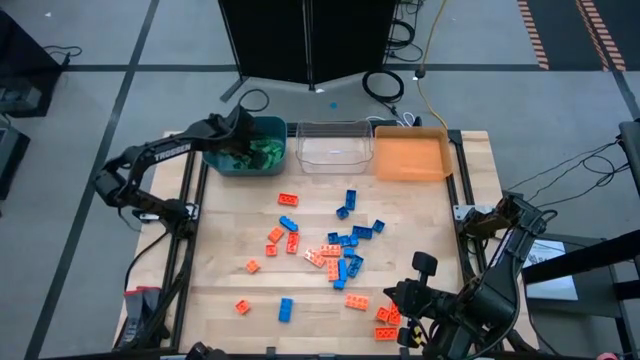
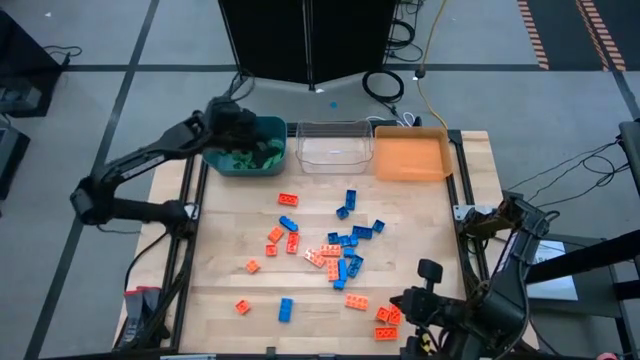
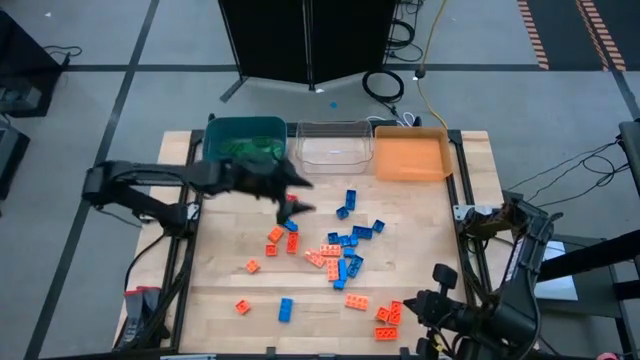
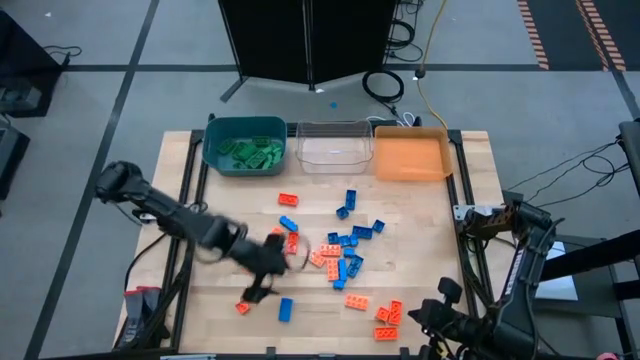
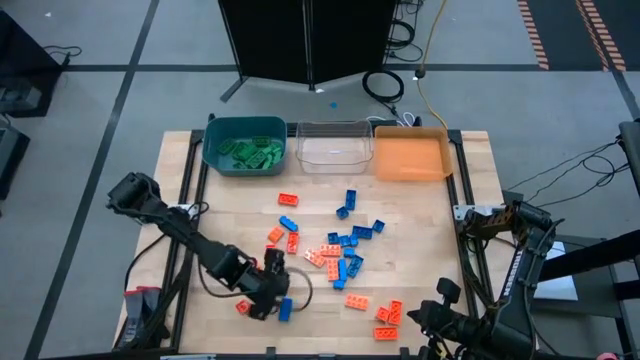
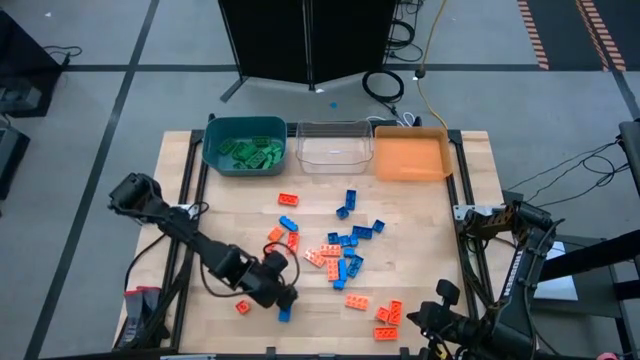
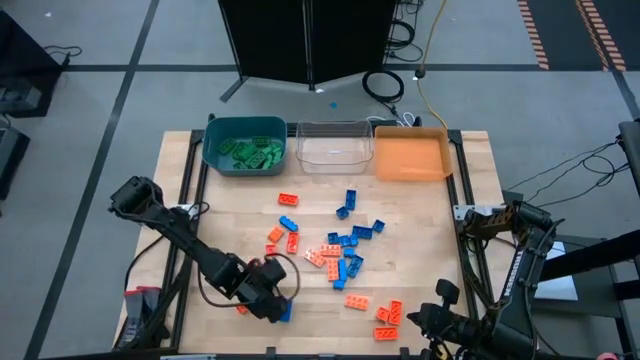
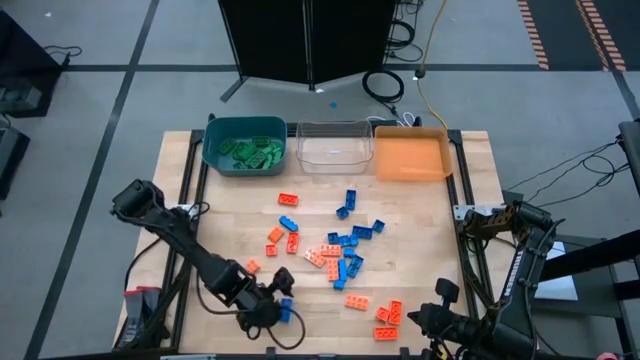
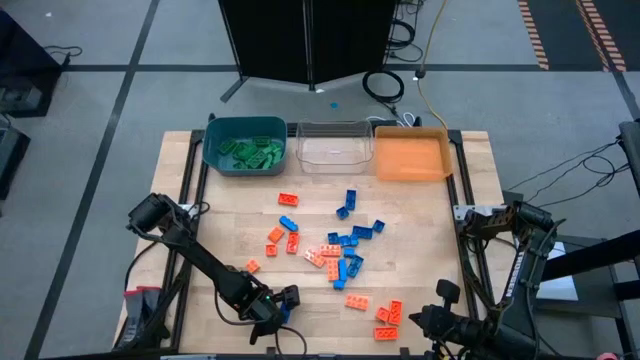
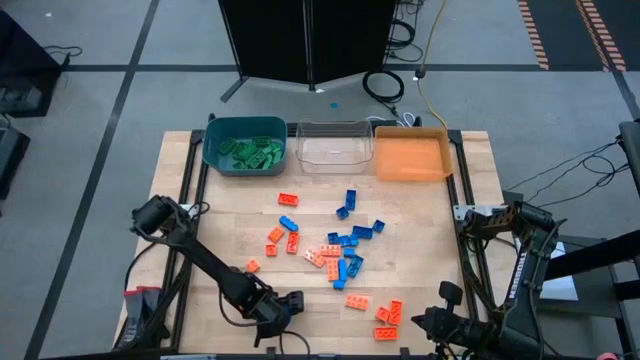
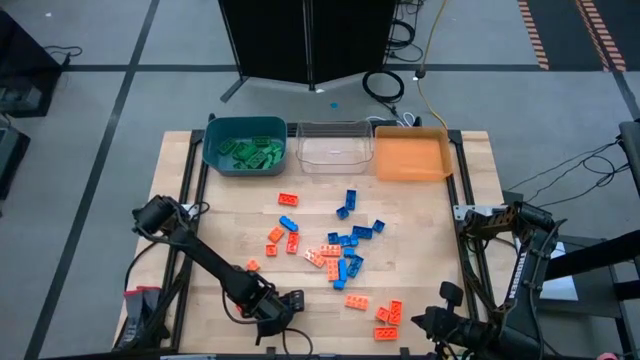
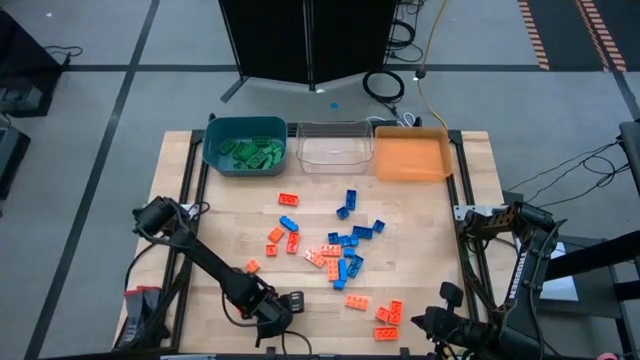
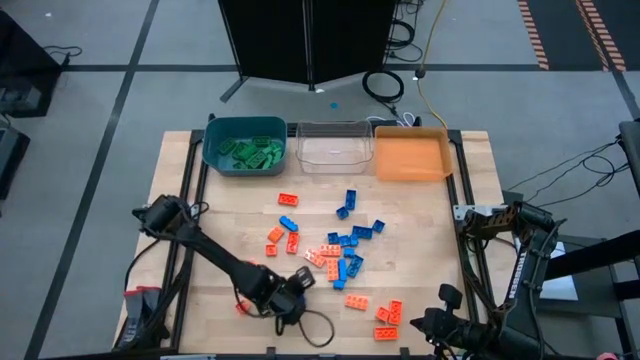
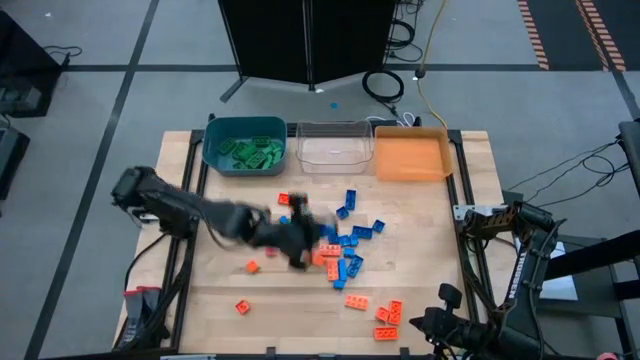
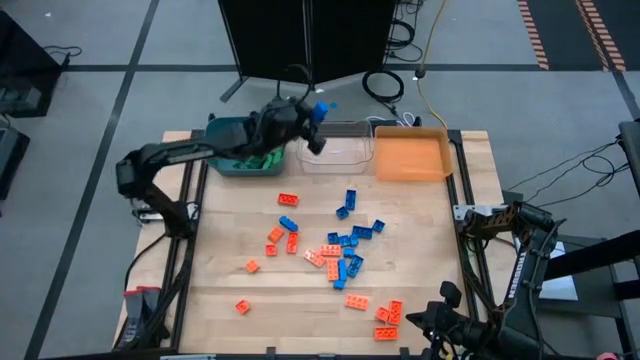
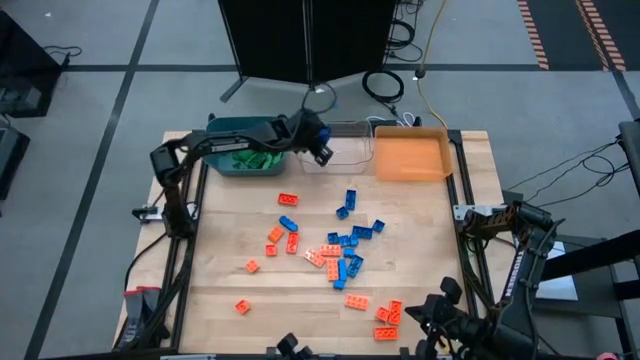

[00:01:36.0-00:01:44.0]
Task: Sort blocks
Put the blue game piece into the transparent bin

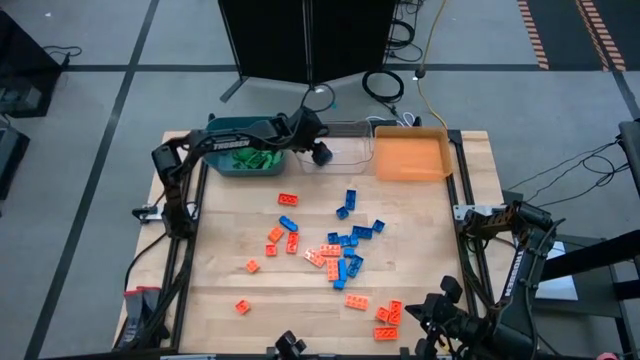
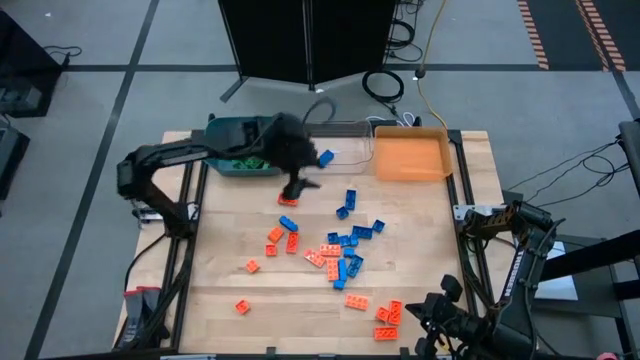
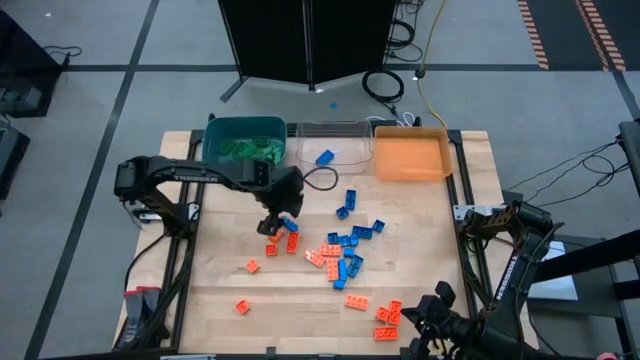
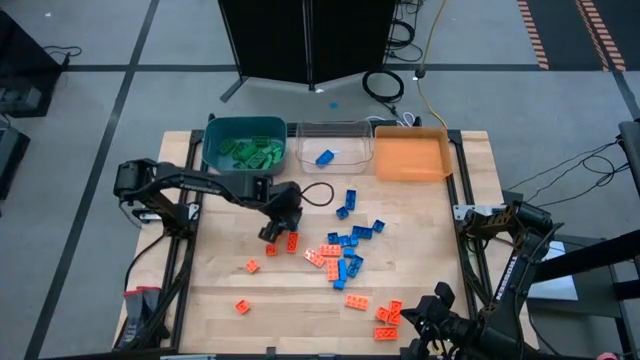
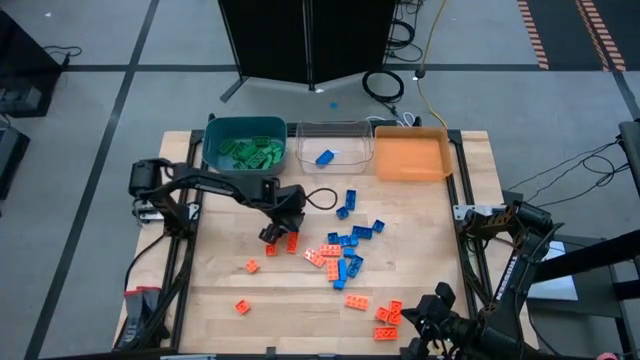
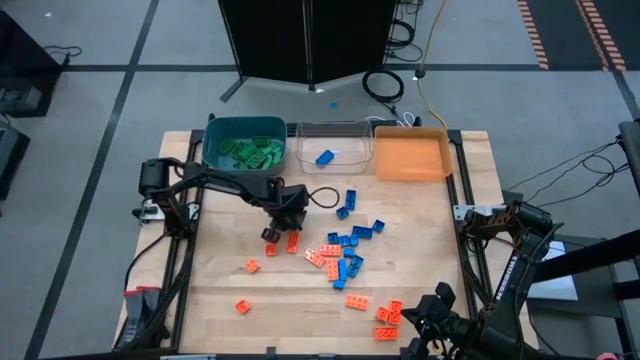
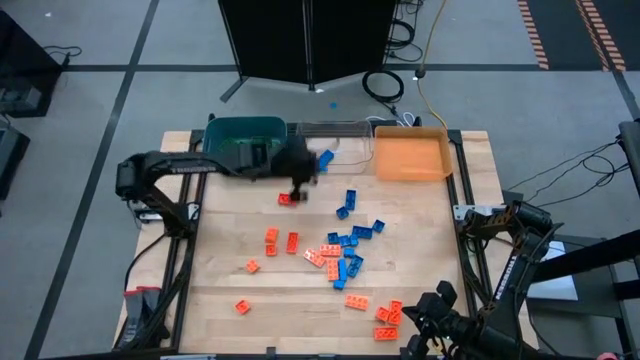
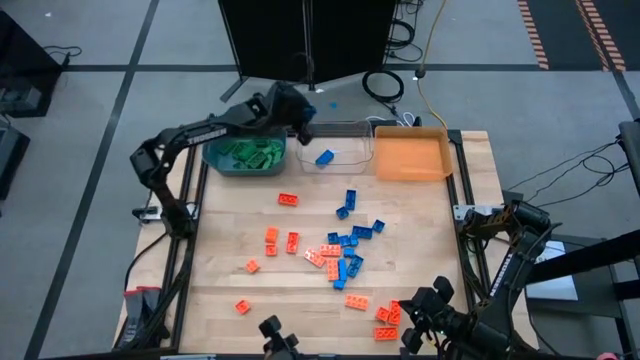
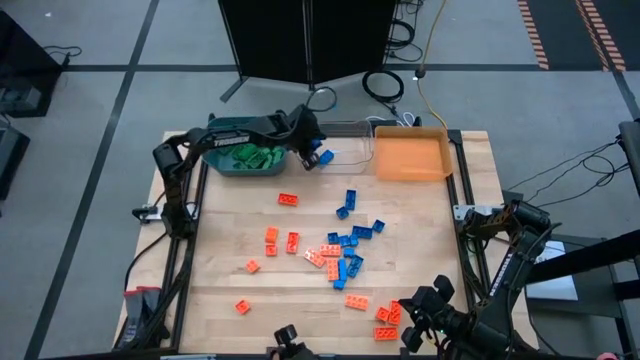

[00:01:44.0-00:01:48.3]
Put the blue game piece into the transparent bin

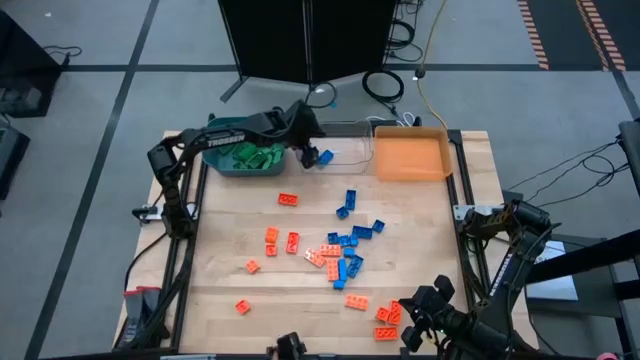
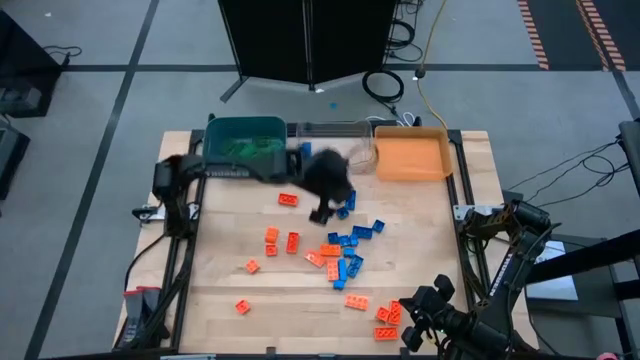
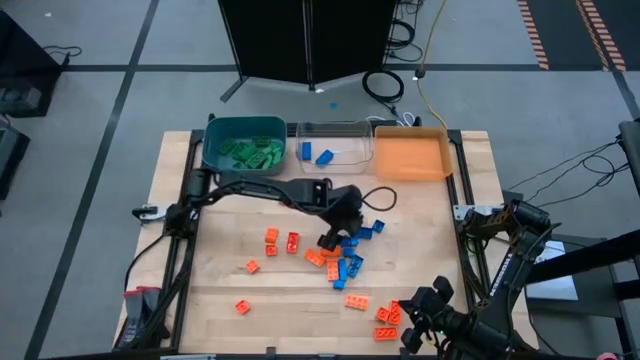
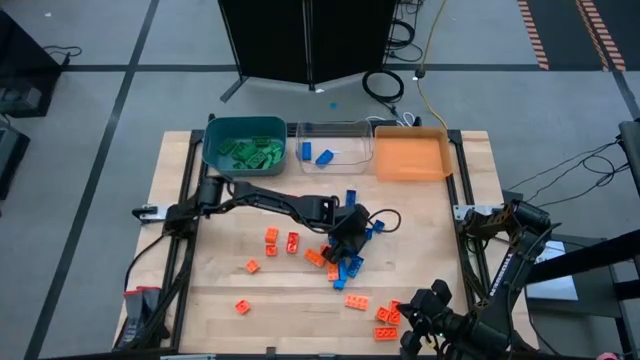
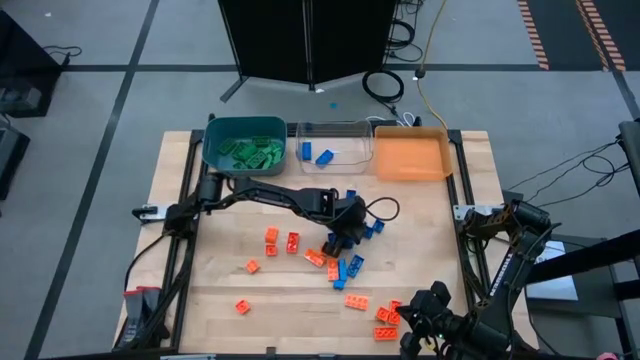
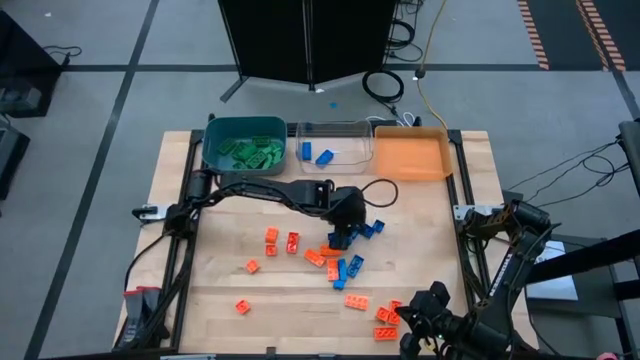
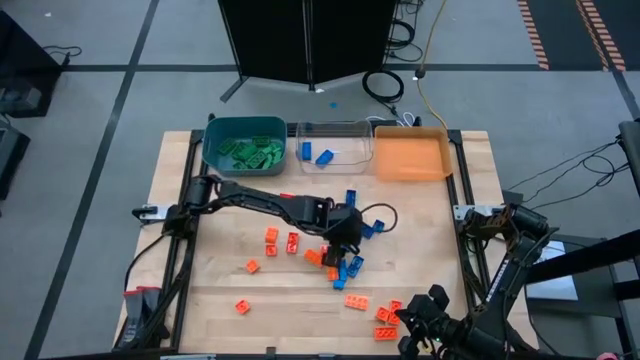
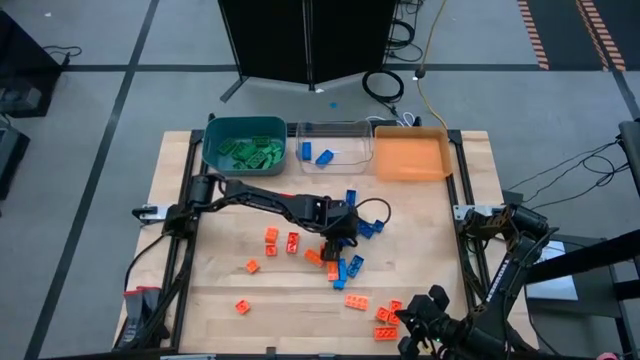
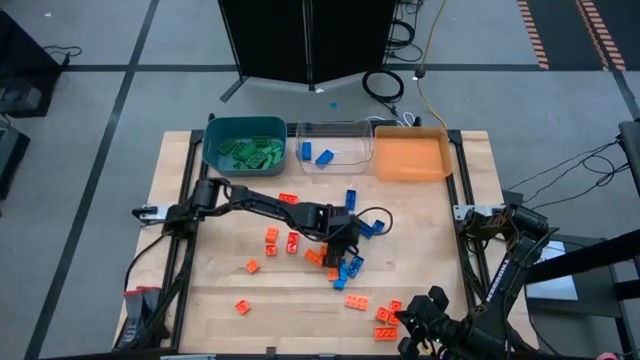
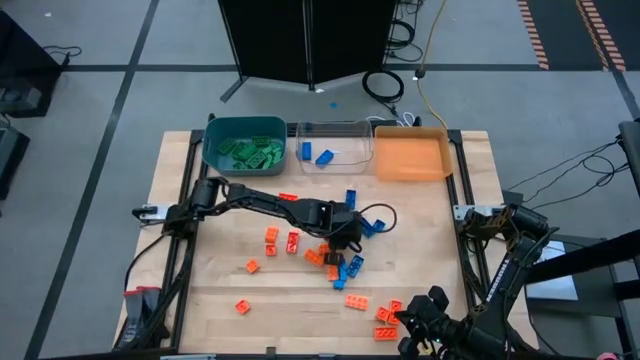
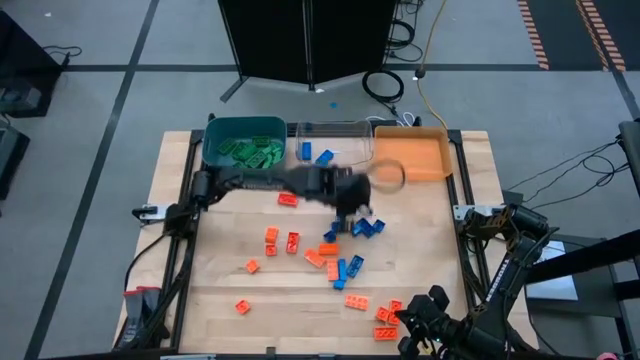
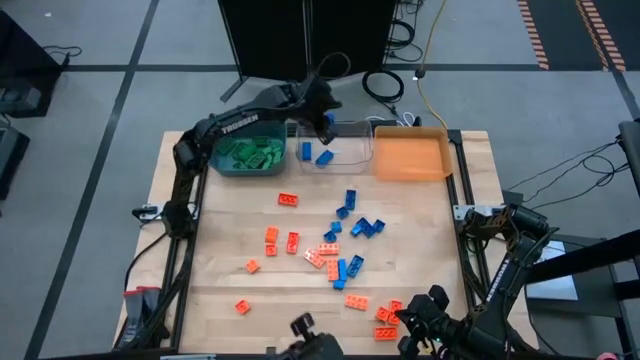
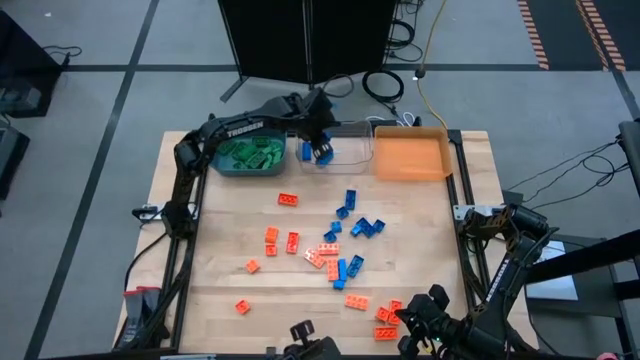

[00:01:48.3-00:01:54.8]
Put the blue game piece into the transparent bin

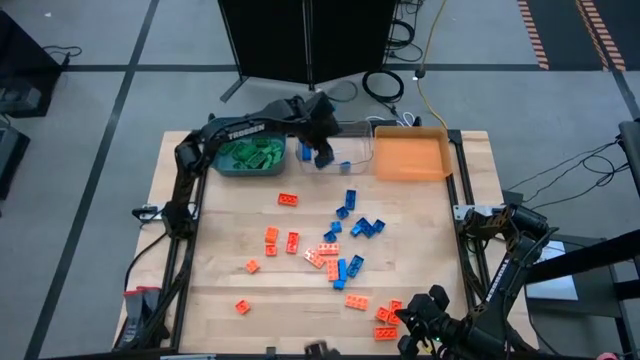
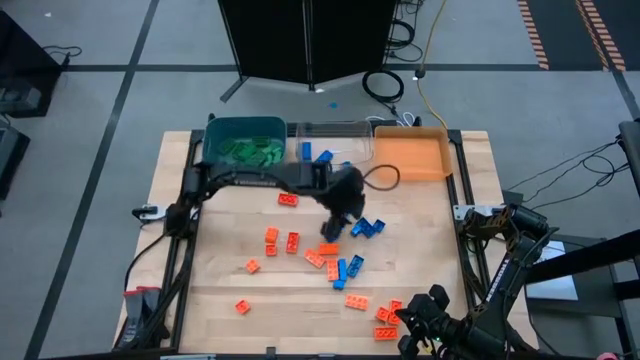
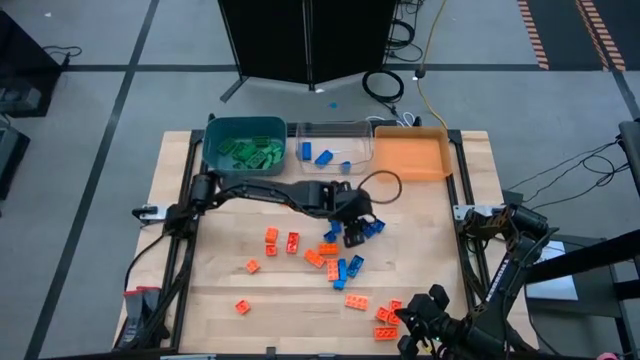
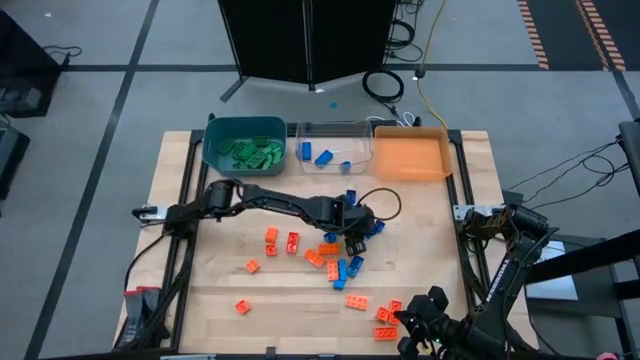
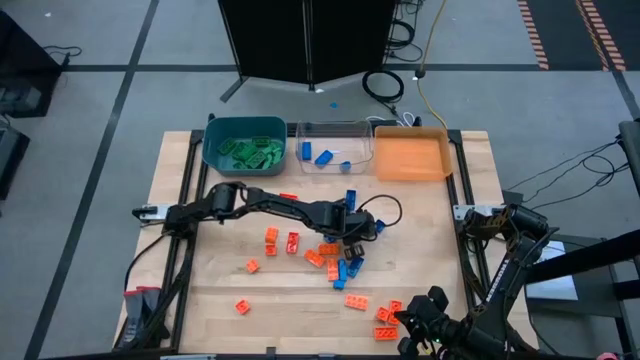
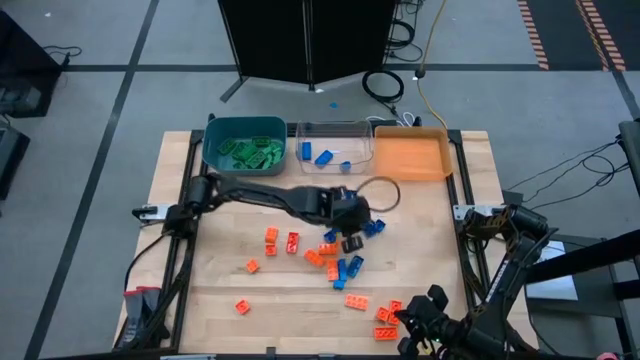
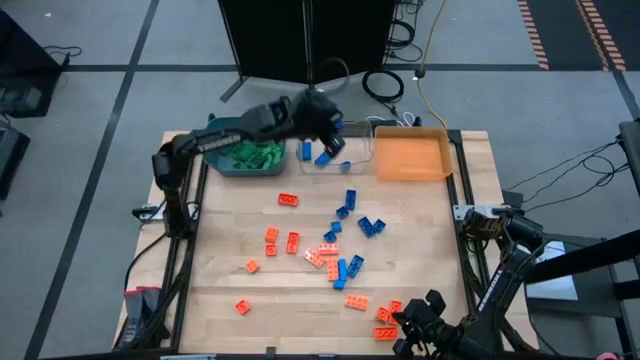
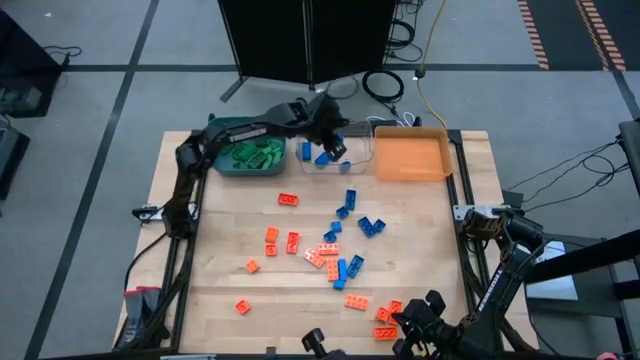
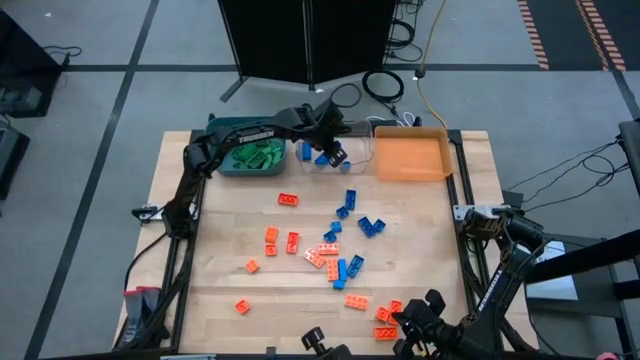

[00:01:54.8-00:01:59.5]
Put the blue game piece into the transparent bin
